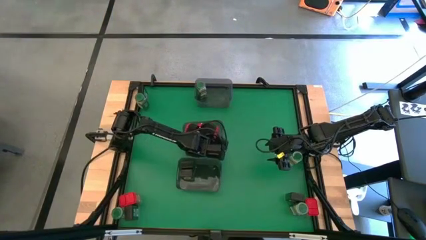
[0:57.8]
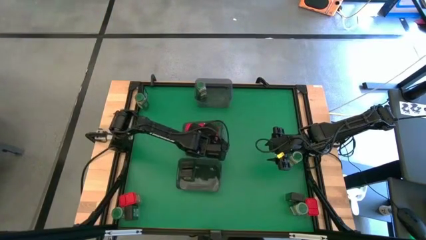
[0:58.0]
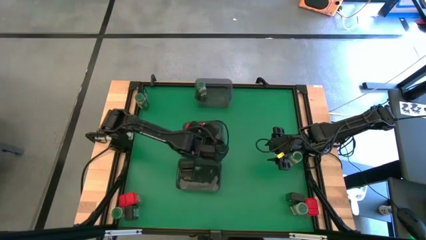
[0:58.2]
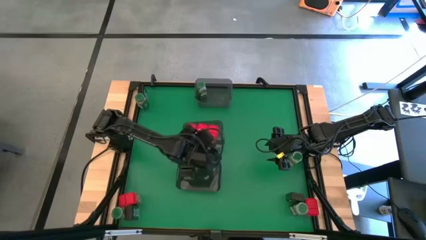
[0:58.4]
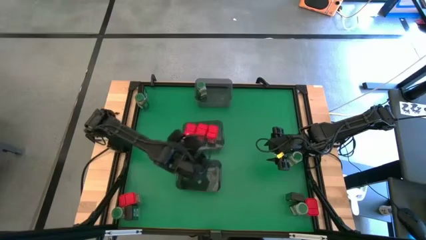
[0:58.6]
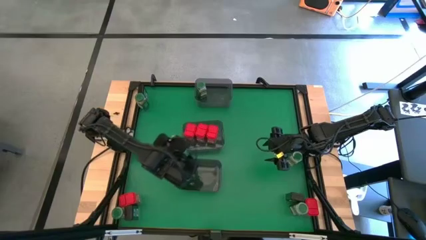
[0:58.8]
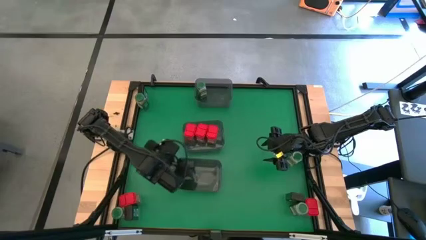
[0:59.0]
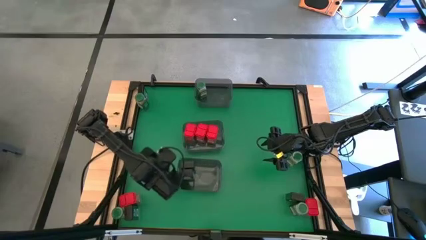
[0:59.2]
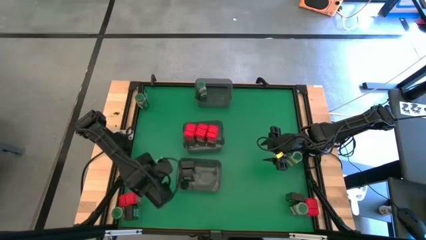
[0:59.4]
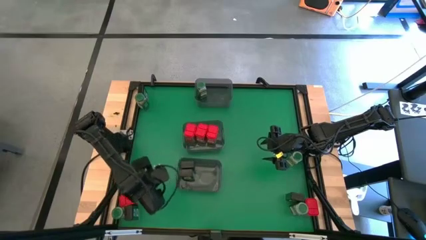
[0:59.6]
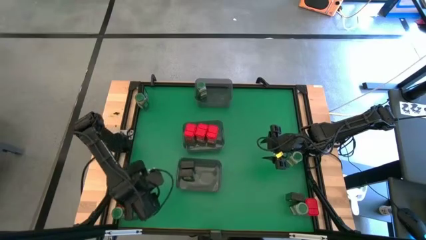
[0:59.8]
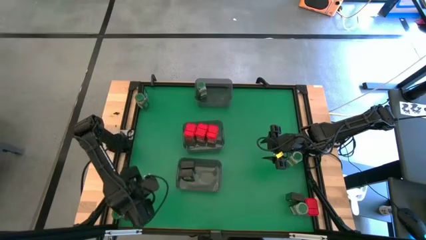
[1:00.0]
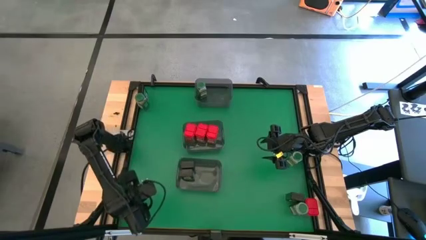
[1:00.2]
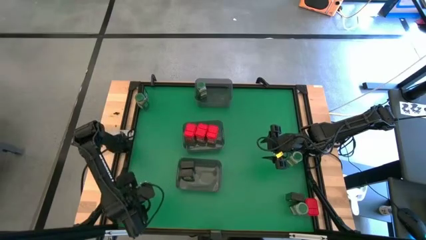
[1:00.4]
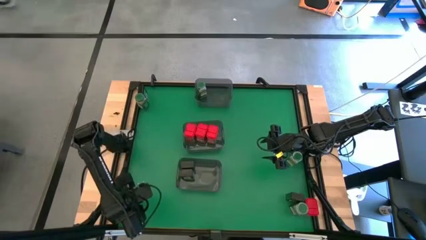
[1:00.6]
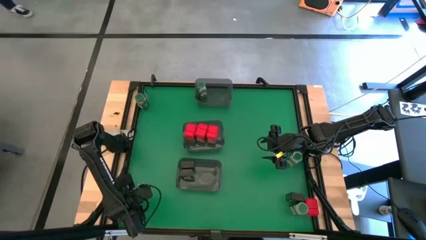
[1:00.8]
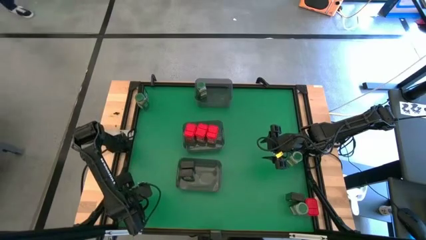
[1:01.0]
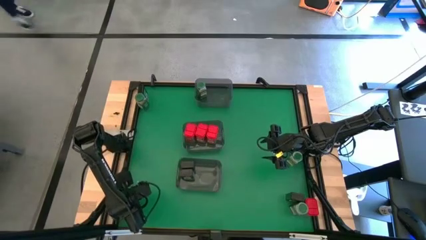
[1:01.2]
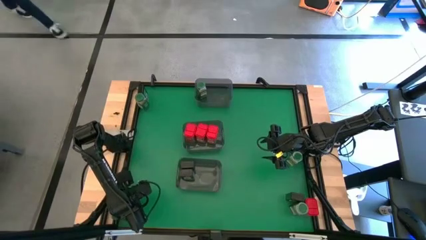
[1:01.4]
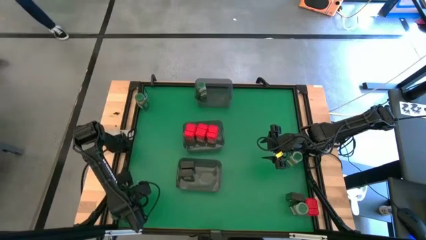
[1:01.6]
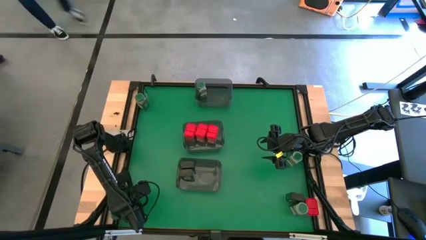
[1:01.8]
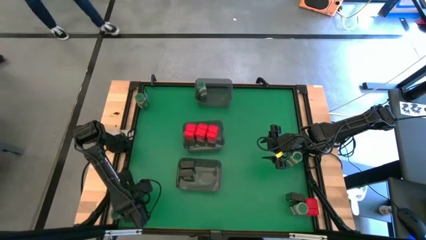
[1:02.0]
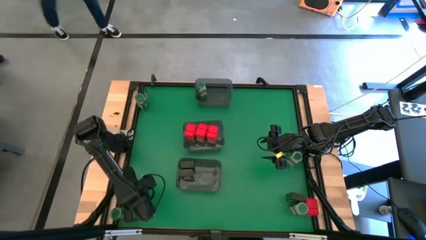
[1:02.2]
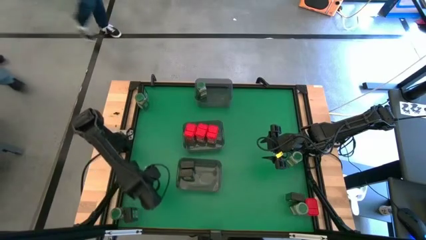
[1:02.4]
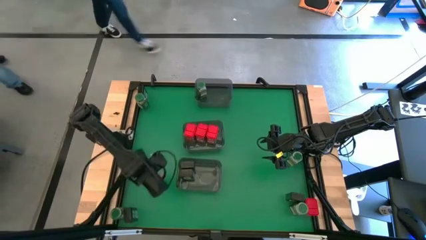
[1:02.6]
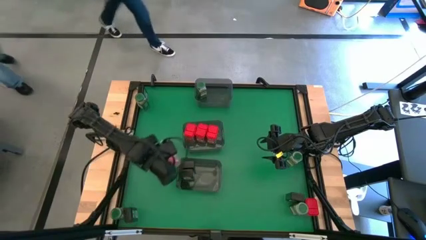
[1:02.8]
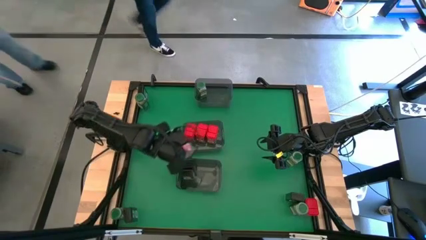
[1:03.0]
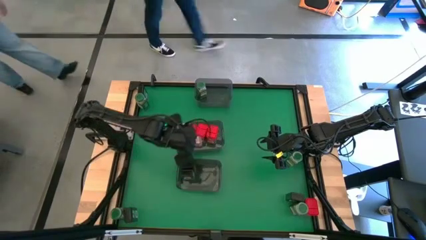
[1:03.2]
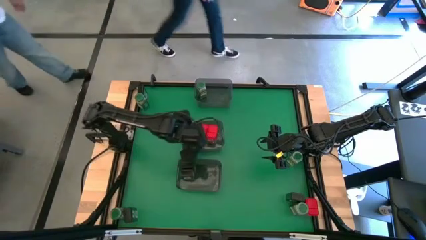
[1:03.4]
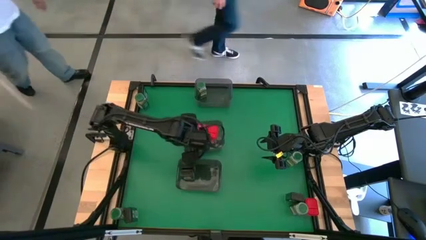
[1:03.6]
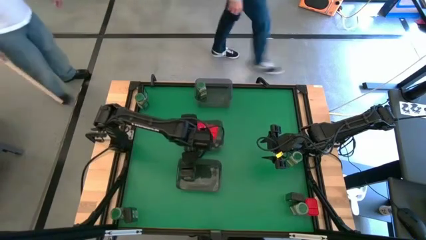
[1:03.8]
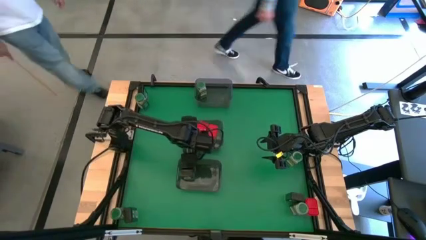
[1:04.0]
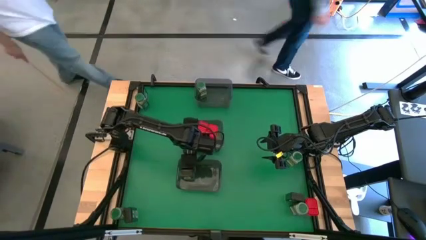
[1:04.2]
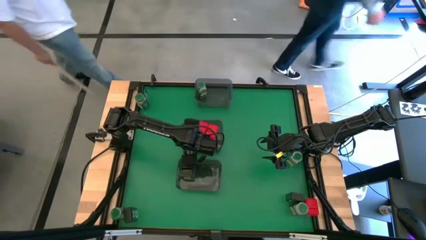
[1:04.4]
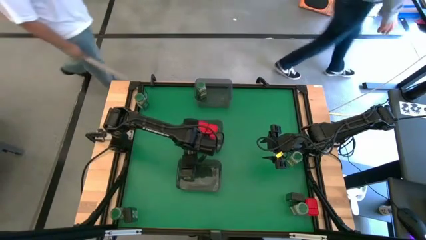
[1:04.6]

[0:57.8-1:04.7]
Task: Sort spices by type
Put the red seasoning can into the middle gray bin

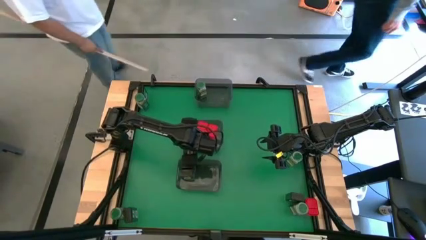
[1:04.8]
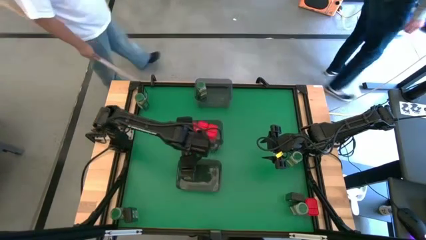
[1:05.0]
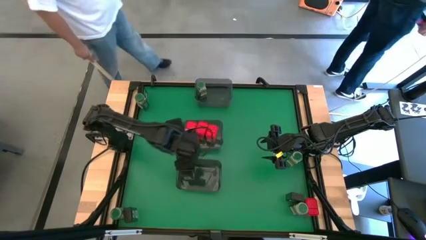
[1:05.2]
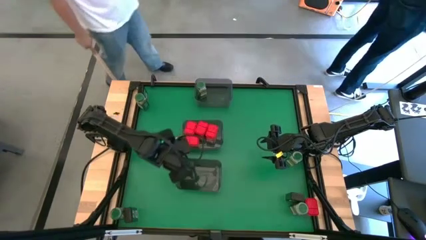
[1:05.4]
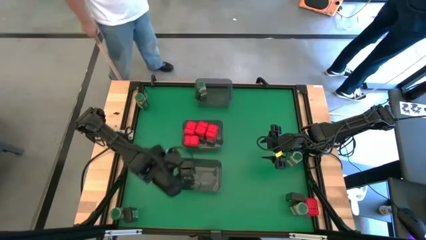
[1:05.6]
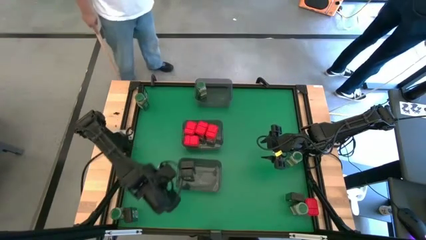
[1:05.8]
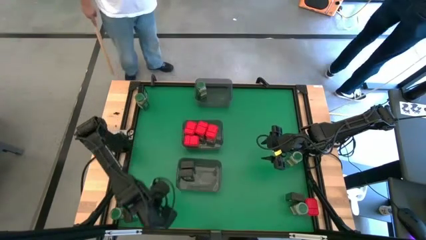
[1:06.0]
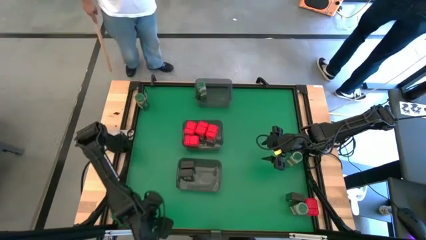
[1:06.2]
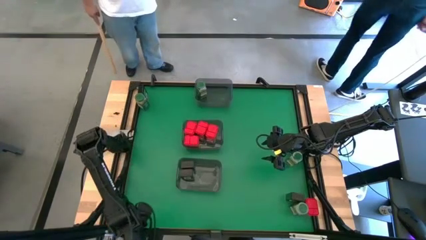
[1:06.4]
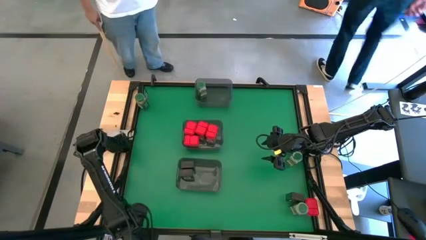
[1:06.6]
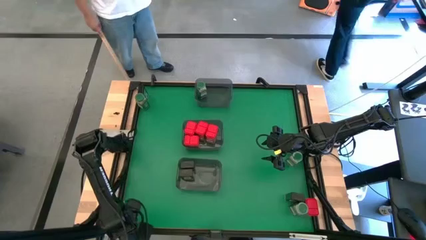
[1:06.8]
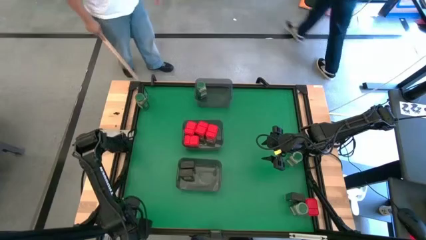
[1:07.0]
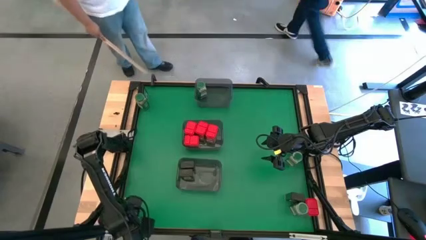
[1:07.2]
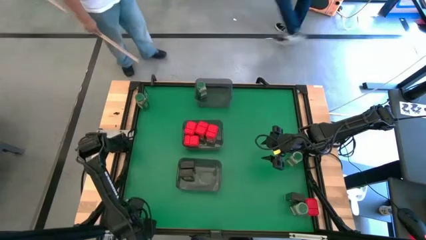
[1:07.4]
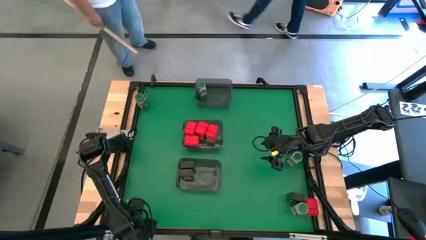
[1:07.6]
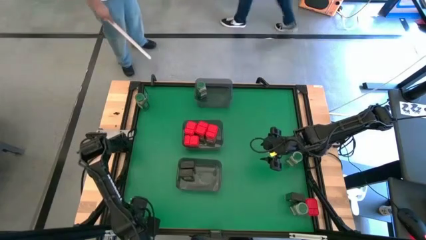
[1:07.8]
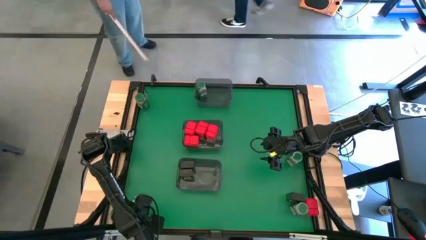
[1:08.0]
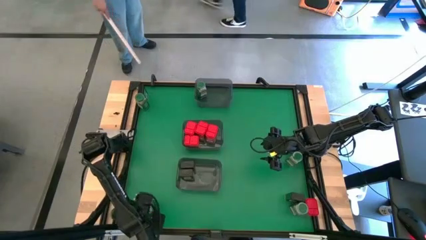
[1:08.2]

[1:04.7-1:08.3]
Put the black seasoning can into the bottom gray bin

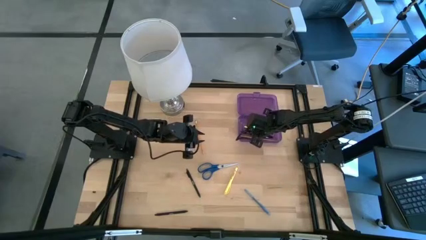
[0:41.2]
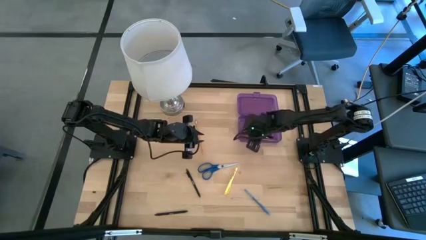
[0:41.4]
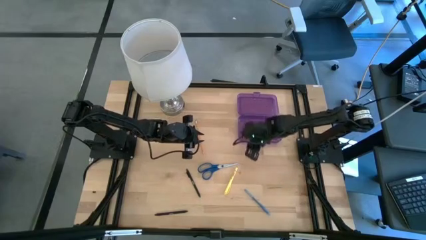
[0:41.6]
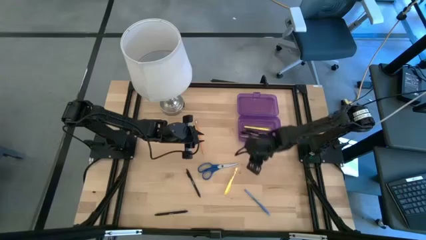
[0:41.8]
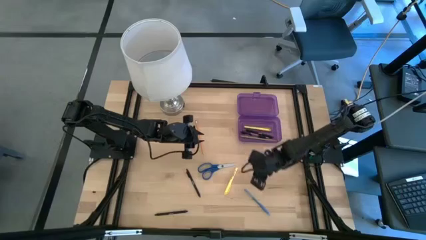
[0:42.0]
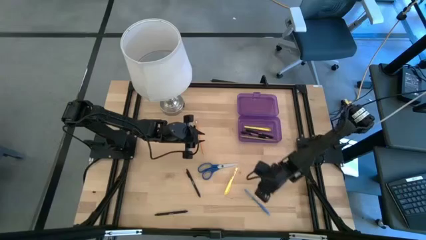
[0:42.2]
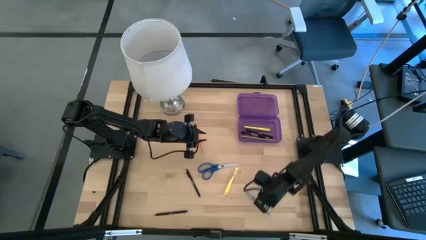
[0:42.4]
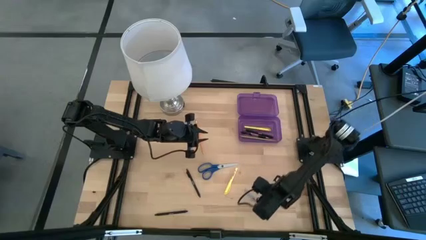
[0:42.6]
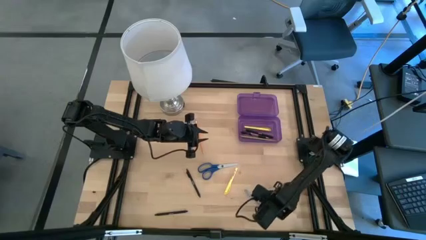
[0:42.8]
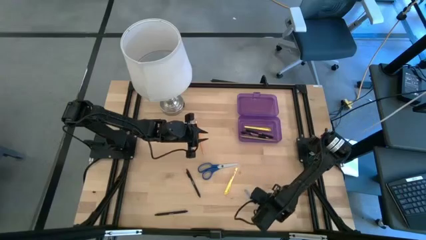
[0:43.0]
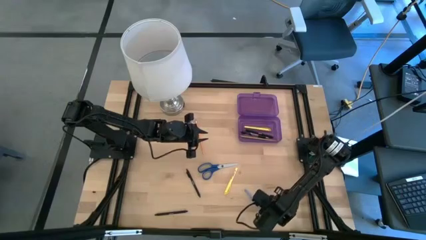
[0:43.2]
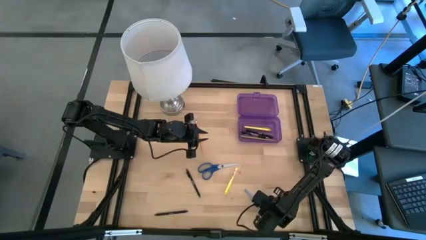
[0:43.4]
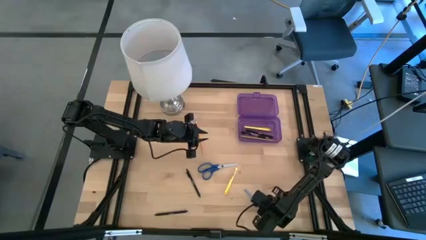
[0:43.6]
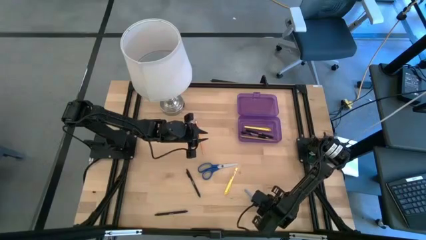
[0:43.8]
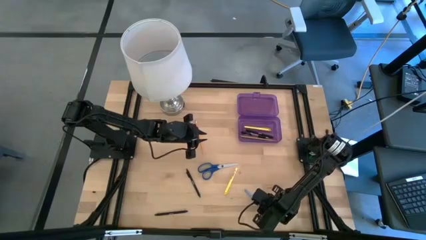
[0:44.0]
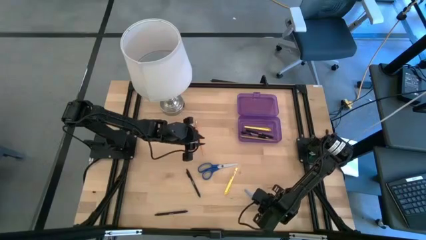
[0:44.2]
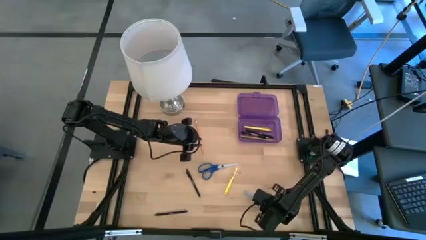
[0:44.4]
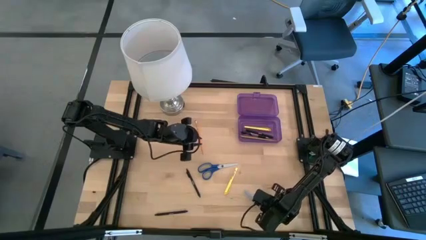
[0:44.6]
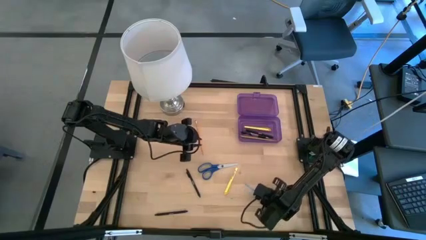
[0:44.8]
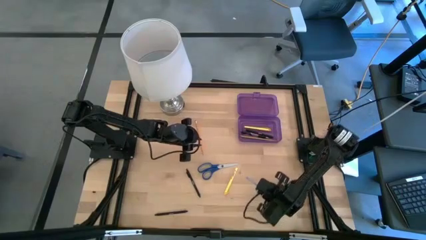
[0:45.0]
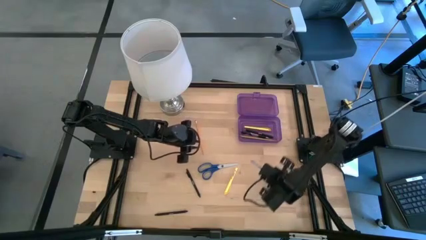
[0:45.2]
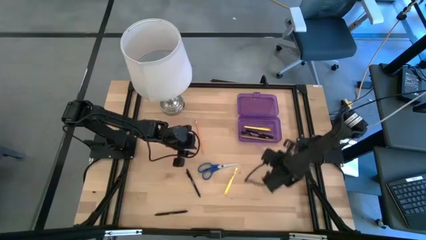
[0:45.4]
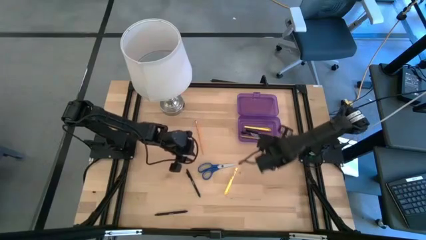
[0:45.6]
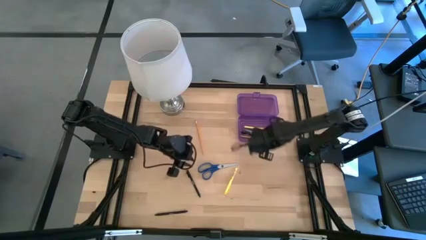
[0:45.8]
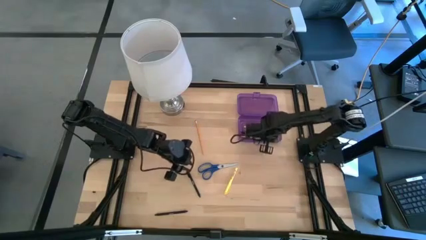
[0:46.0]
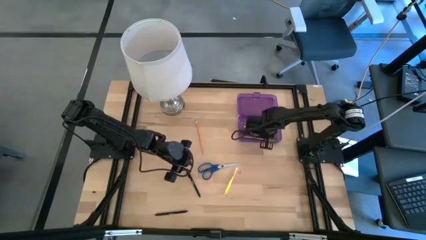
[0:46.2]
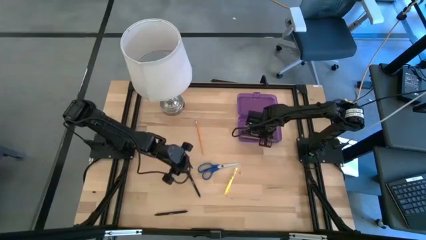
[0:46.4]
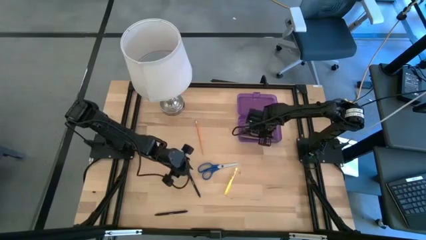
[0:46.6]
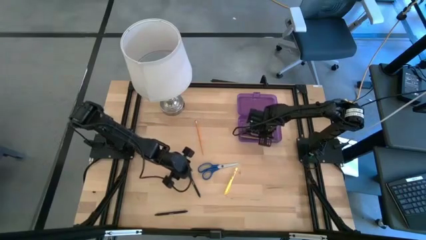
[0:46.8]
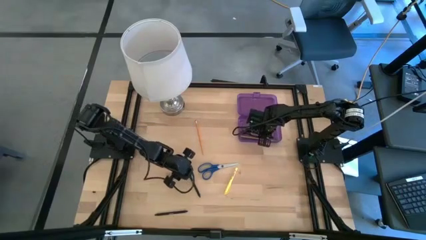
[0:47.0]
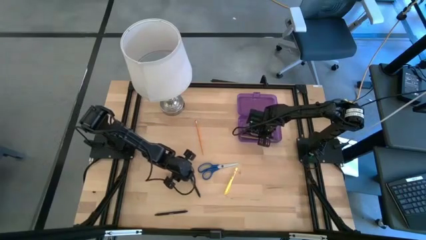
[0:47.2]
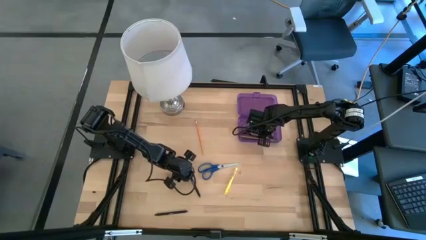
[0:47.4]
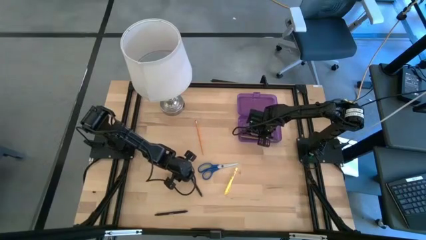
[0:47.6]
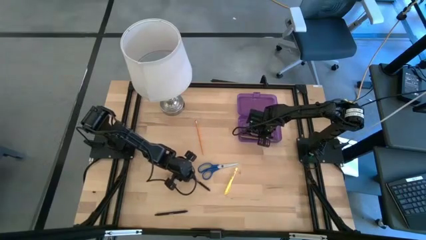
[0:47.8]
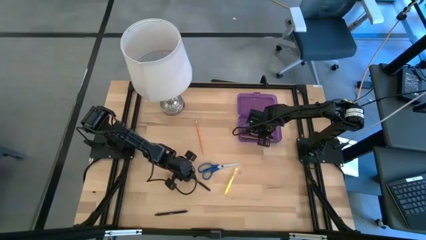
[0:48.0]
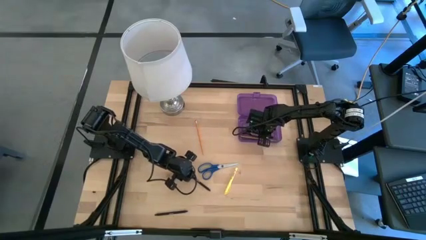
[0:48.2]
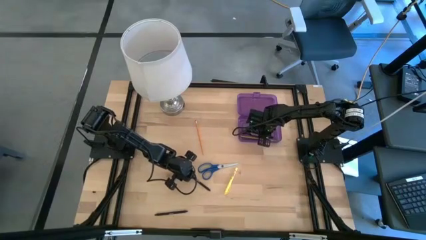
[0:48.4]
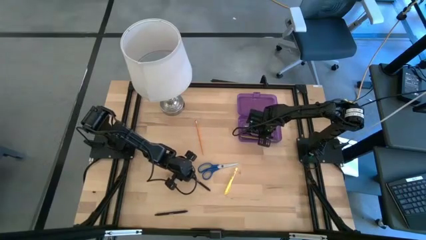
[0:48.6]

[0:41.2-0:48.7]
Task: Pick & place school supplies into a supply box
Put the blue pen into the purple supply box
